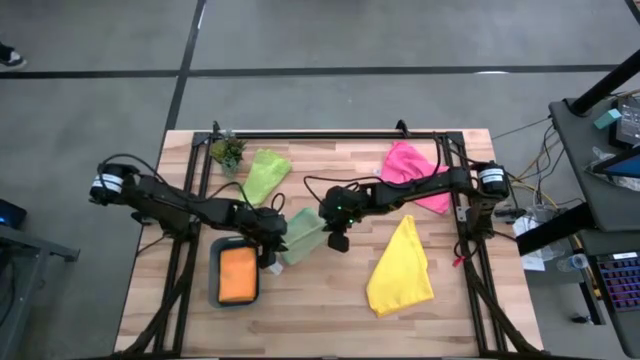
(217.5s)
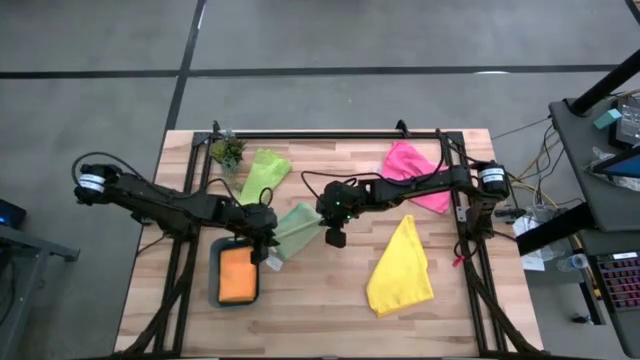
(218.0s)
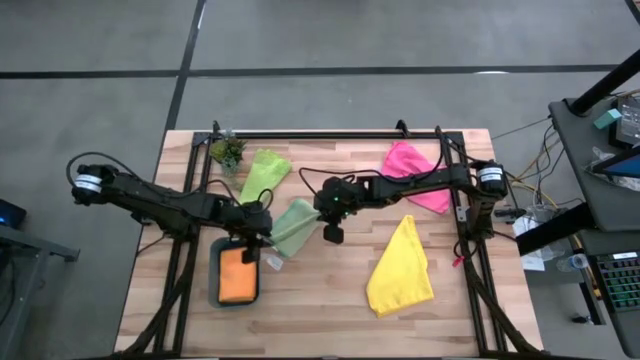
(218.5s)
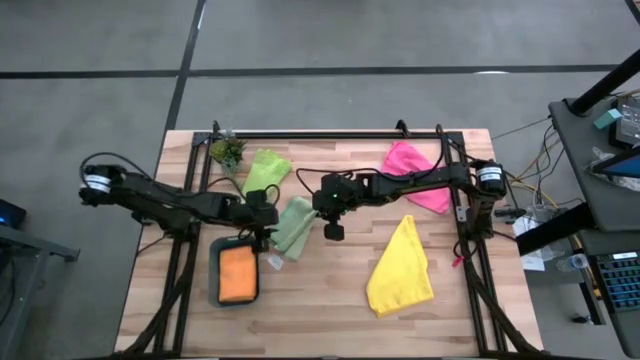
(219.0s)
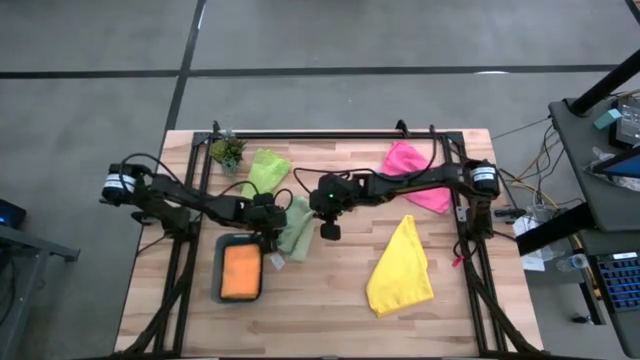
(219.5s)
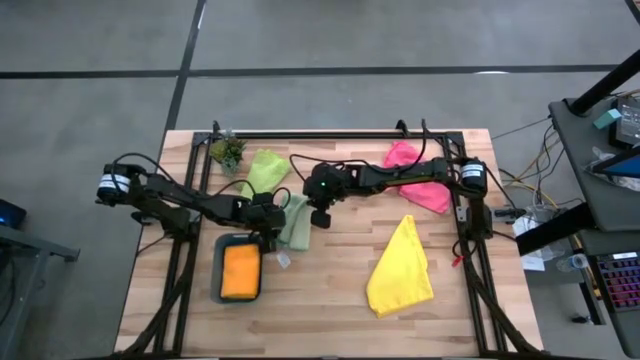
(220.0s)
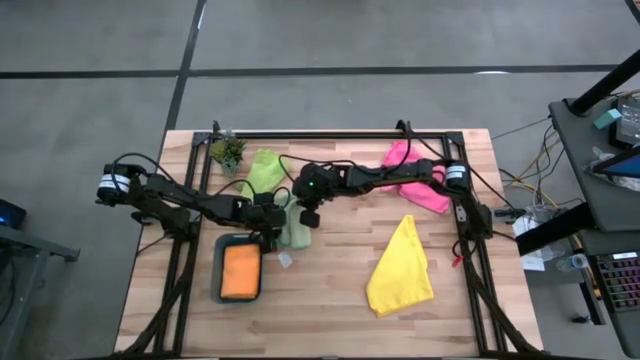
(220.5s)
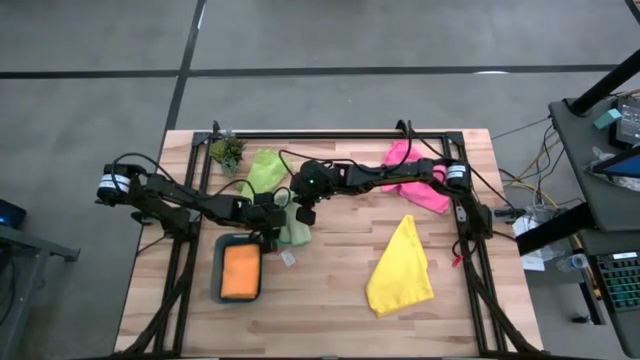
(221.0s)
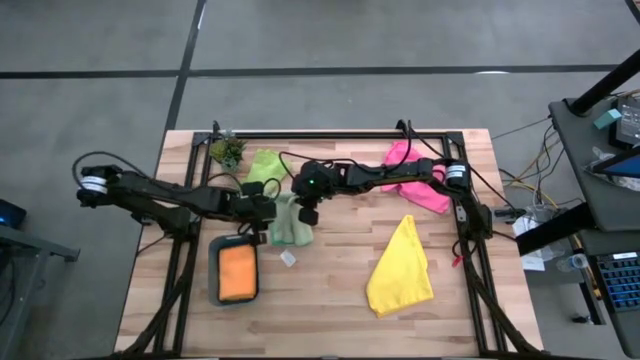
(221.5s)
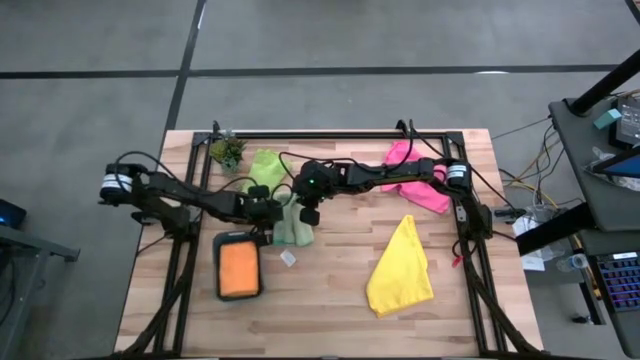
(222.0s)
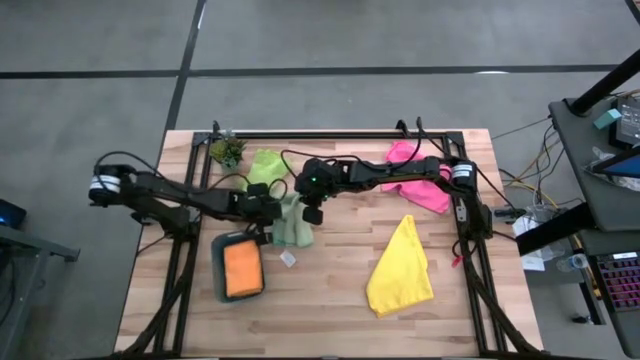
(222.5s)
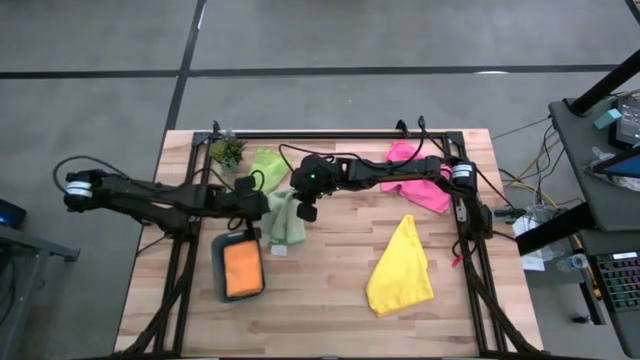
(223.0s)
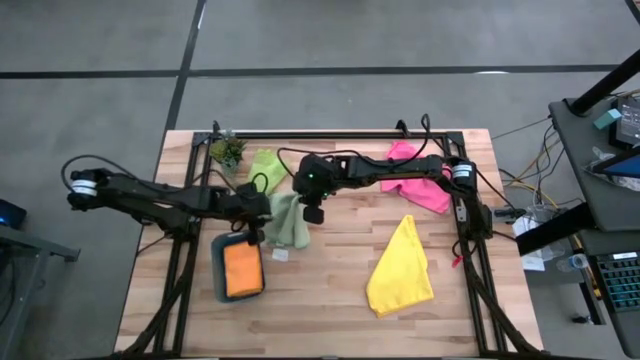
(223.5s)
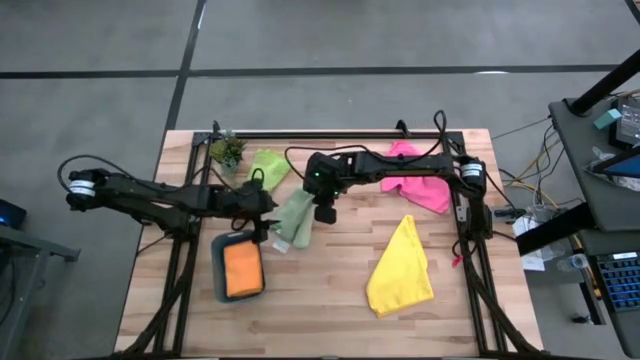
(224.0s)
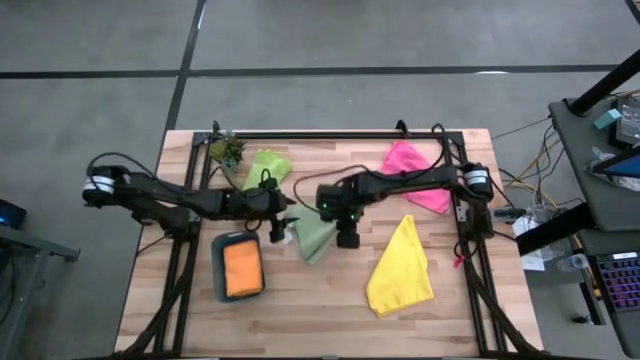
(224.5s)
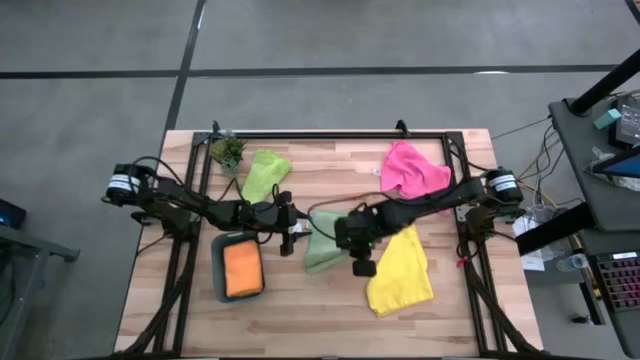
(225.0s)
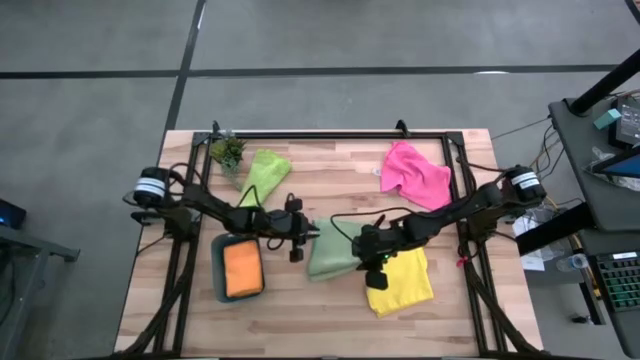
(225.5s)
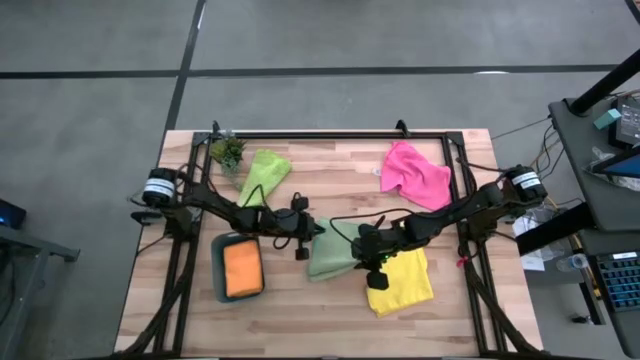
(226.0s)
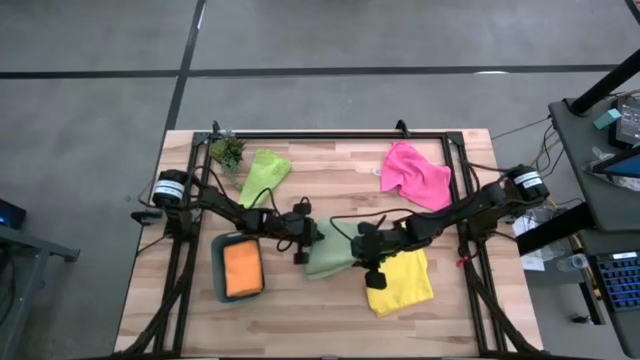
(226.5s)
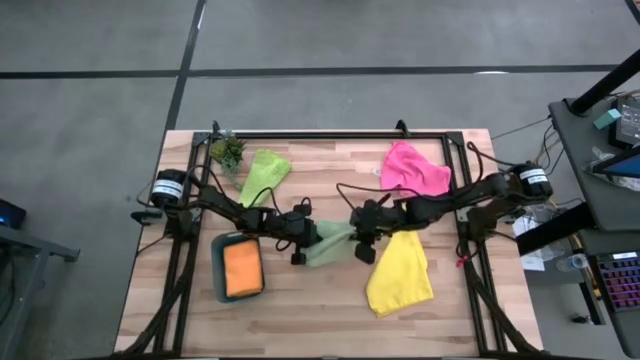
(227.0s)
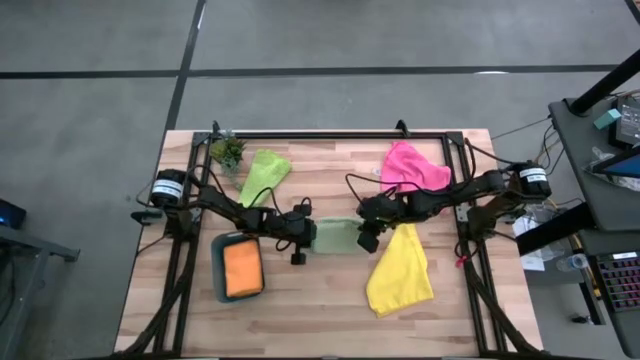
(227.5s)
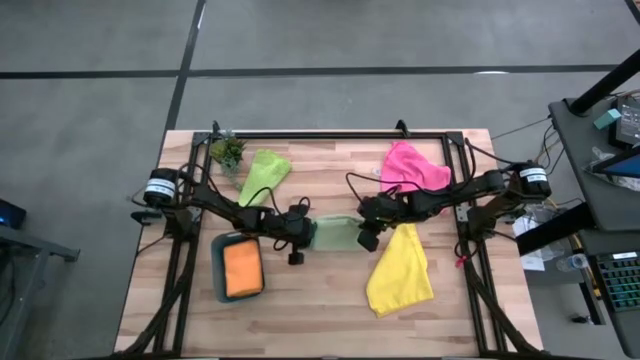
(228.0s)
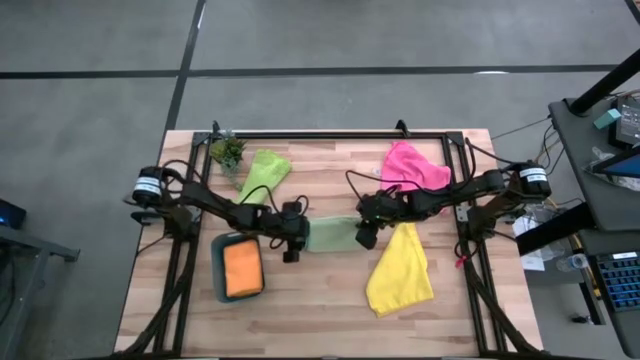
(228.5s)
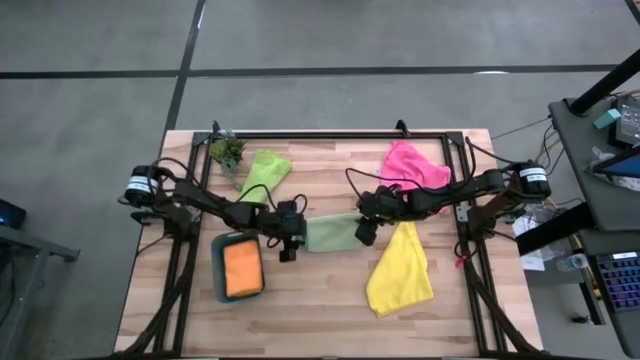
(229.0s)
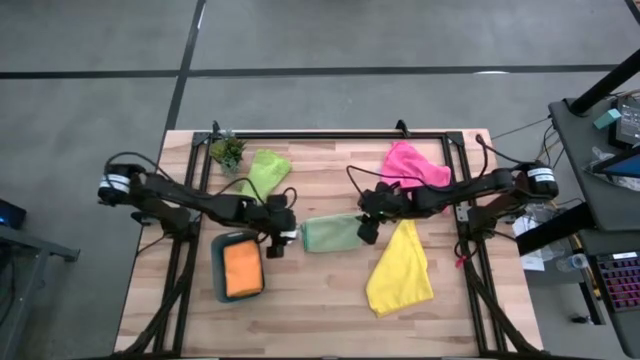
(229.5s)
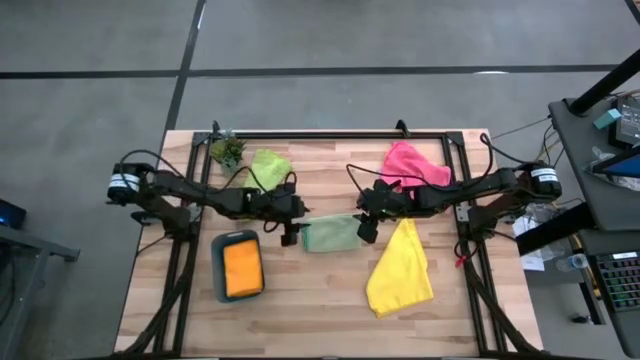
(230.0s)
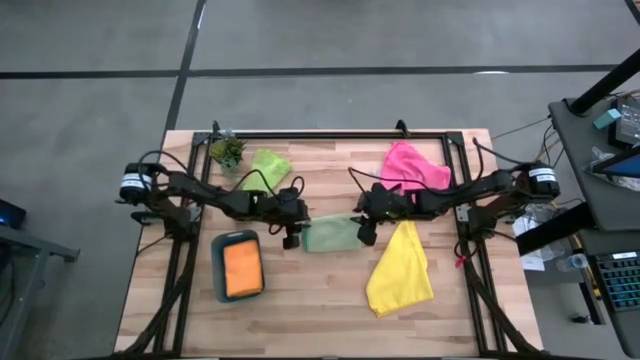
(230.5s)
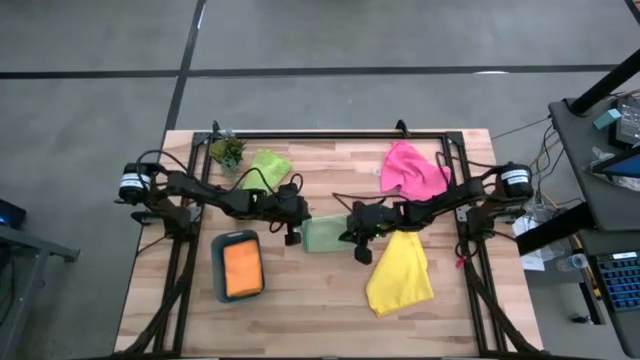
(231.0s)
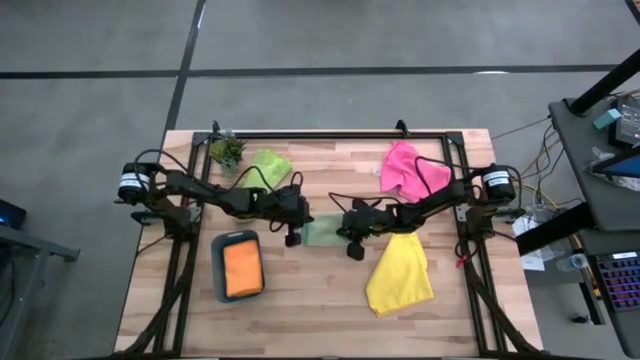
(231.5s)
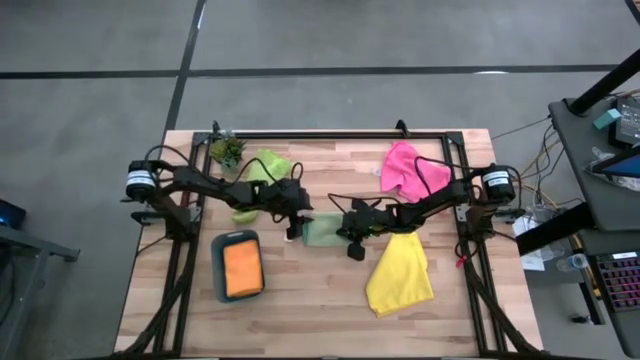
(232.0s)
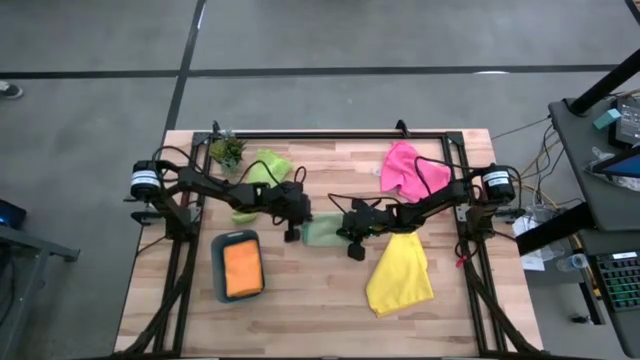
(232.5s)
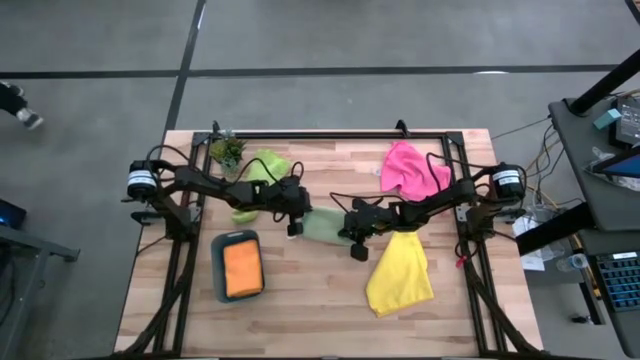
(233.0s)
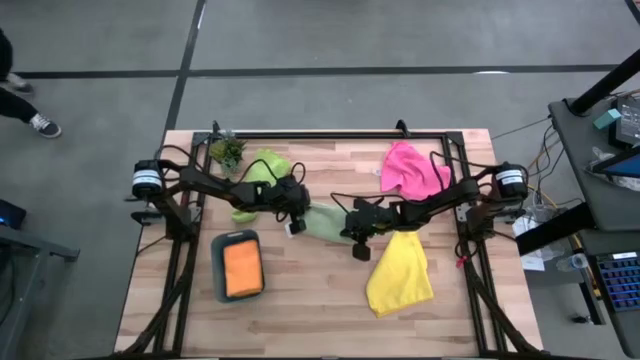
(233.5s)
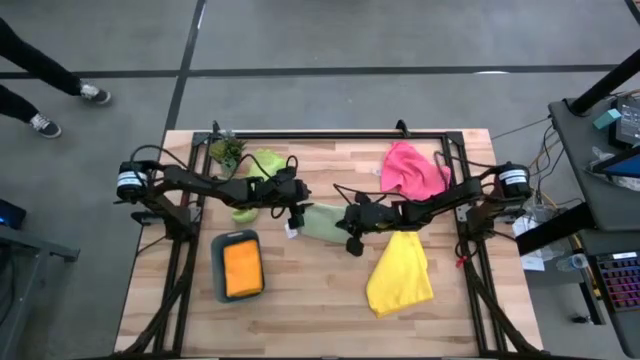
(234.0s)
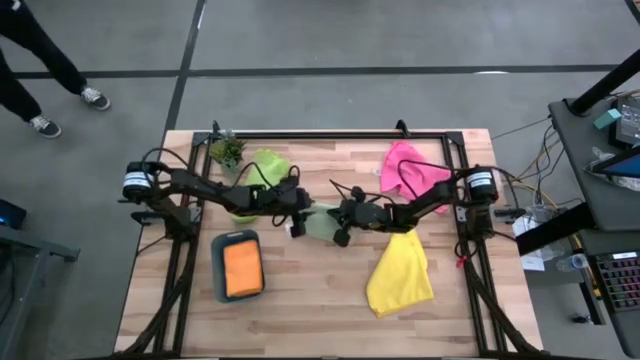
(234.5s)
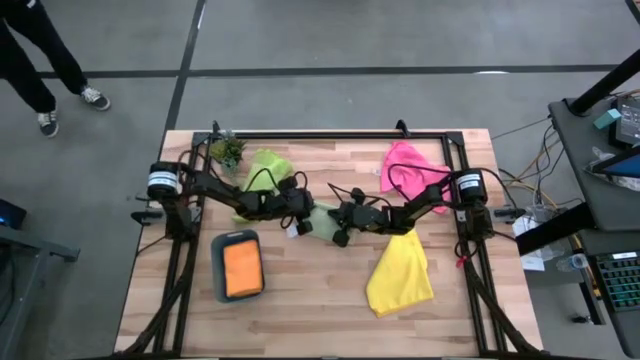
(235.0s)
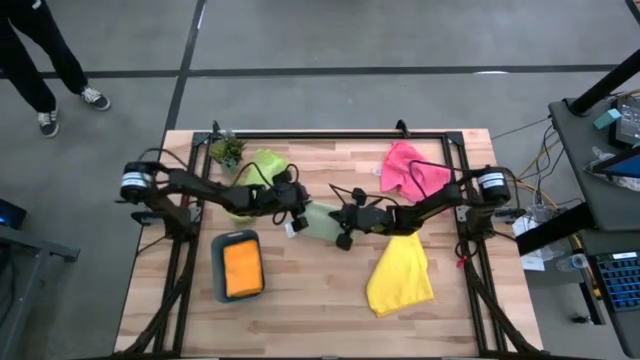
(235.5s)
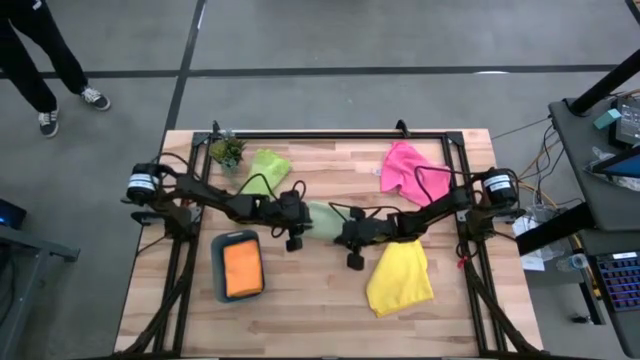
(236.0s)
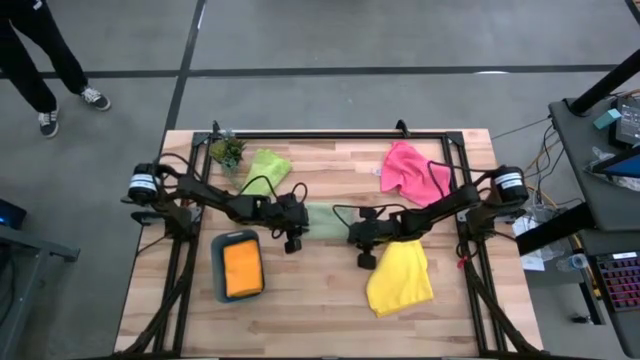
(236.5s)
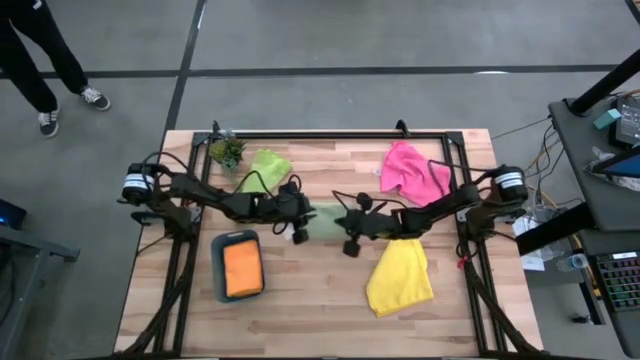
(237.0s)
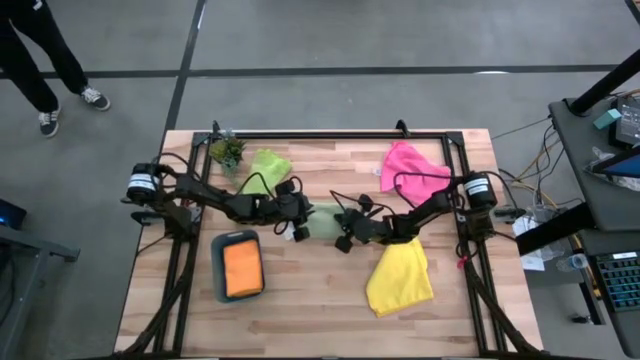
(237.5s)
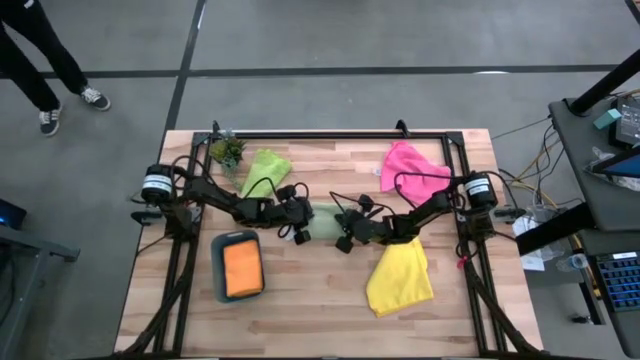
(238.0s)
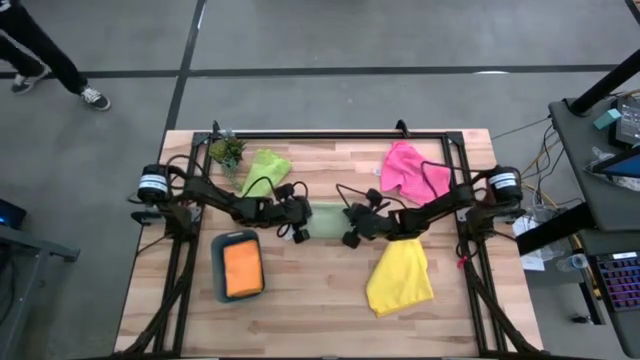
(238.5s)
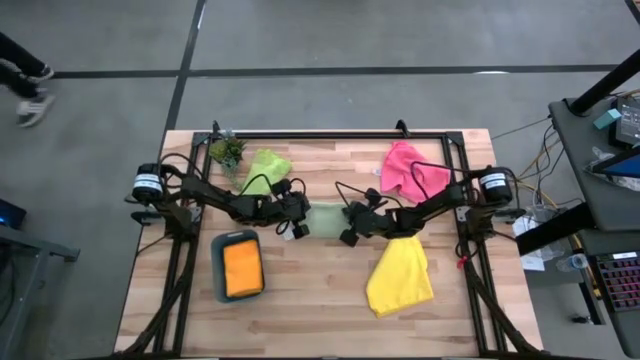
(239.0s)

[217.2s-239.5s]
Task: Fold microfiber towels
Fold the light green microfiber cloth
